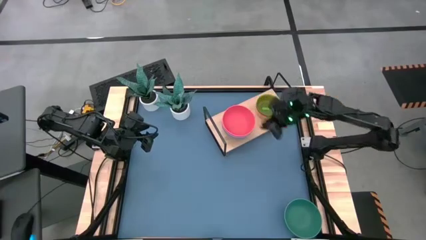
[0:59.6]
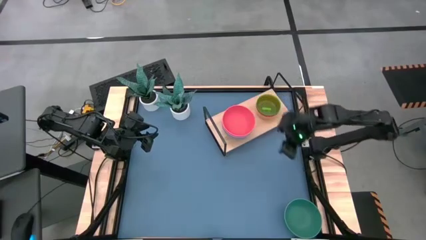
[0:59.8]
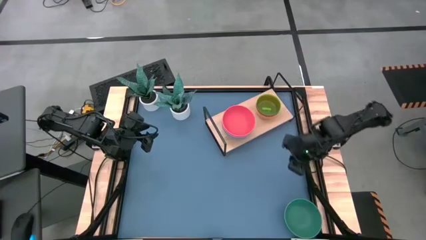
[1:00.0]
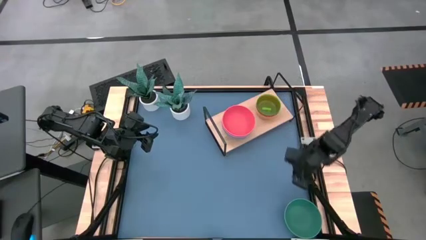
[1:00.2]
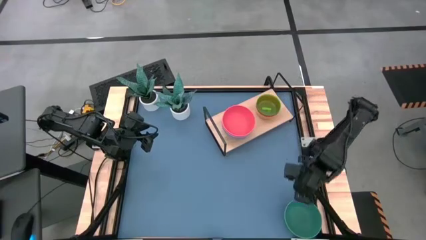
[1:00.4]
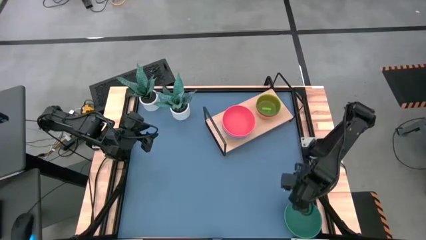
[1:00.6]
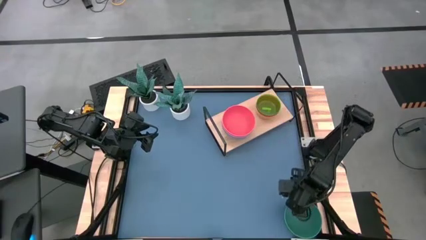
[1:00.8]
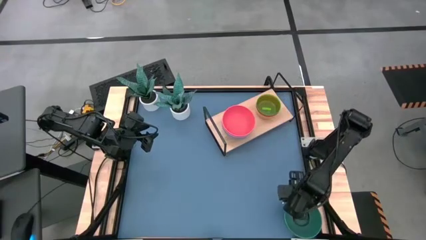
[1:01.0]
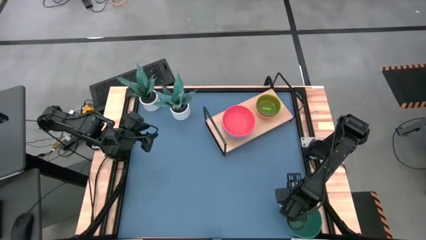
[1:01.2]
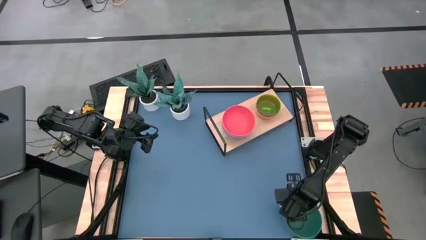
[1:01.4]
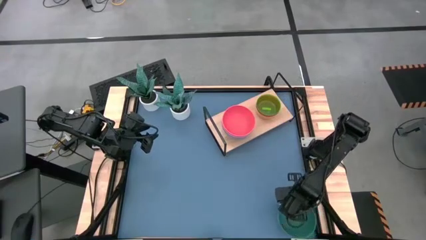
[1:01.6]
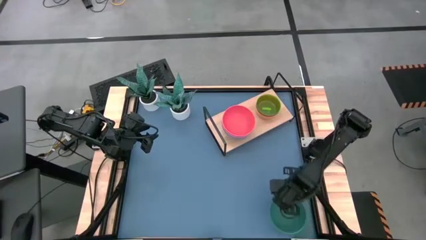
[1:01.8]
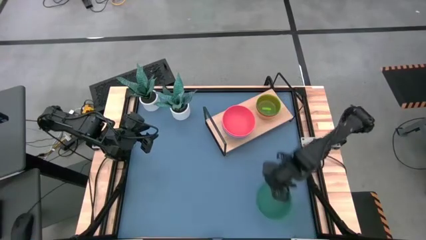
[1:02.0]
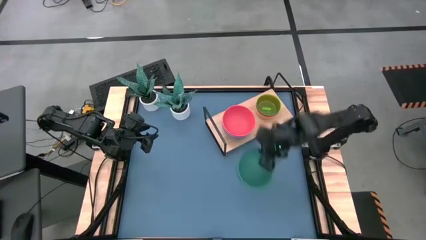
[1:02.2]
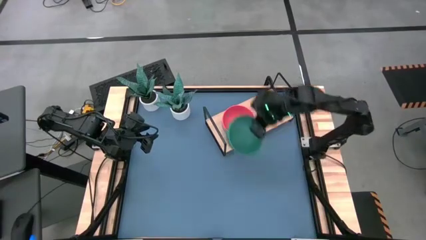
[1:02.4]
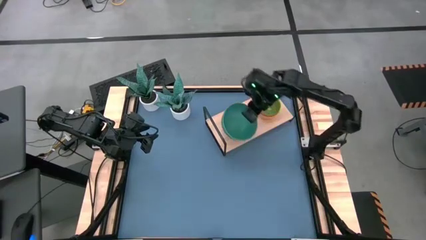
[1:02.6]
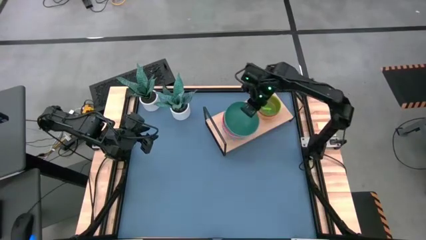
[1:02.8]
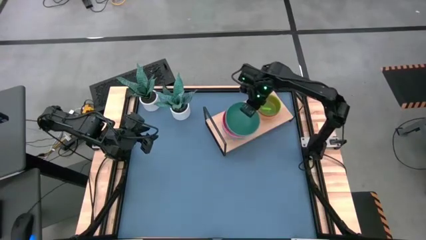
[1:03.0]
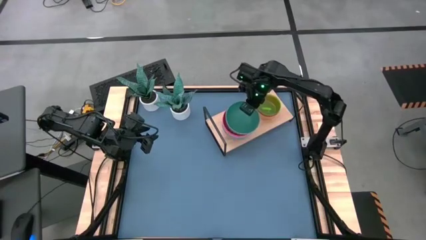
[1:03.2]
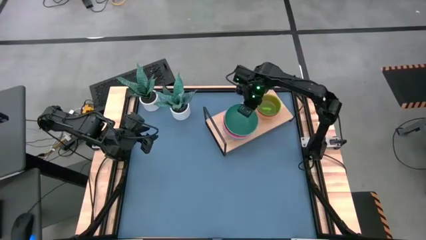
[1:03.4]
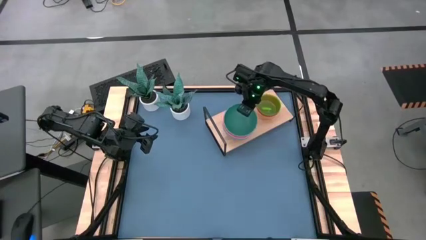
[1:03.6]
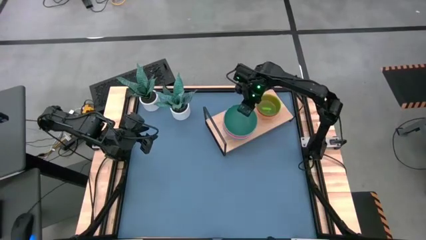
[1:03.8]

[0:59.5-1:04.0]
Task: Place and stack bowls onto a shelf
Stack the large green bowl on top of the large orange bowl on the shelf

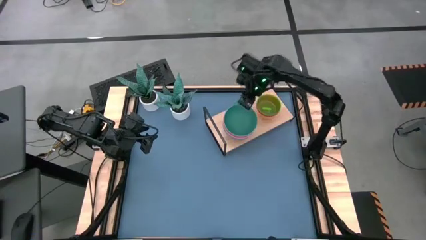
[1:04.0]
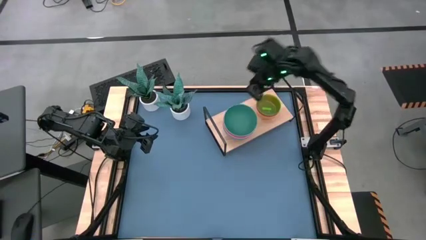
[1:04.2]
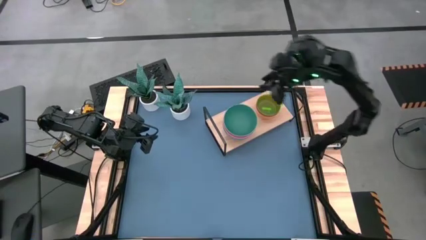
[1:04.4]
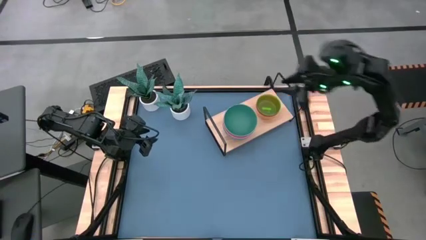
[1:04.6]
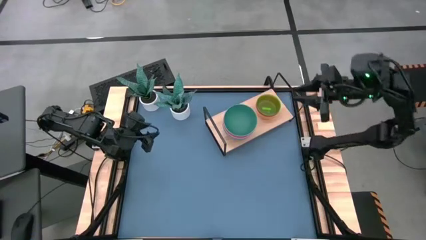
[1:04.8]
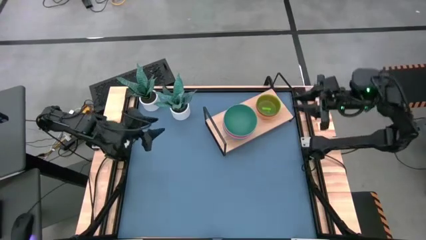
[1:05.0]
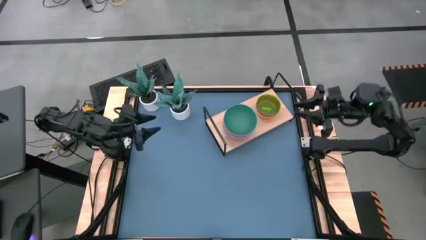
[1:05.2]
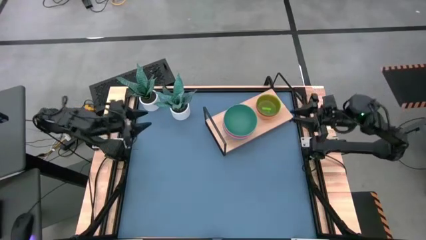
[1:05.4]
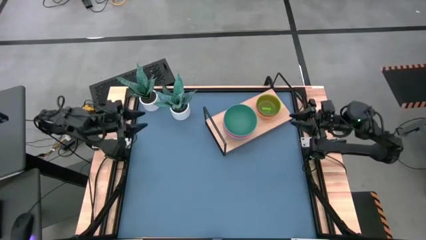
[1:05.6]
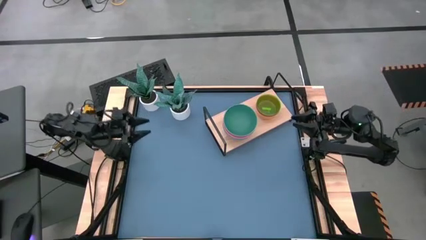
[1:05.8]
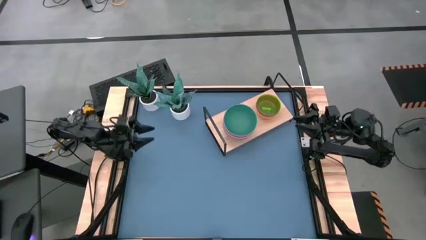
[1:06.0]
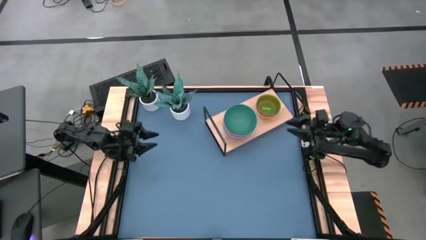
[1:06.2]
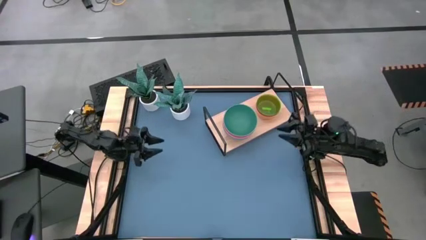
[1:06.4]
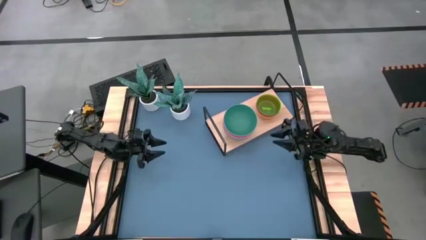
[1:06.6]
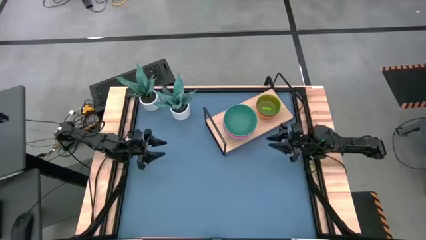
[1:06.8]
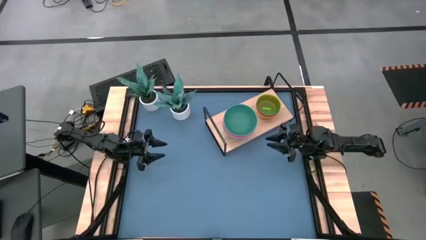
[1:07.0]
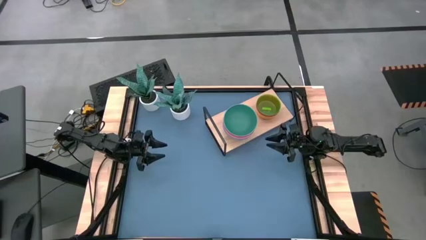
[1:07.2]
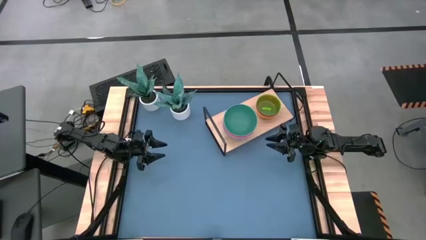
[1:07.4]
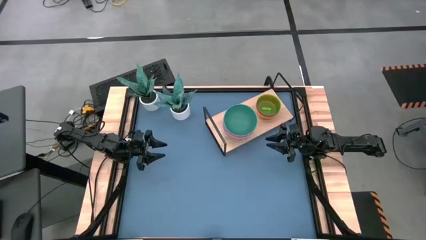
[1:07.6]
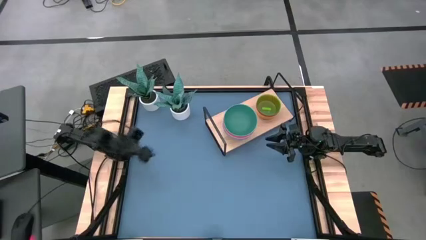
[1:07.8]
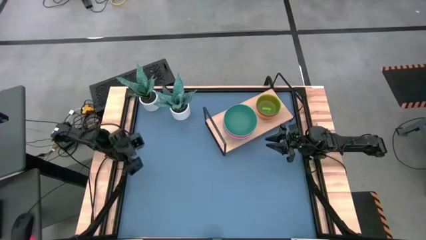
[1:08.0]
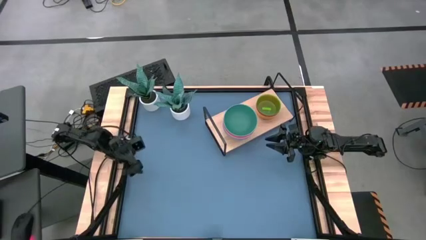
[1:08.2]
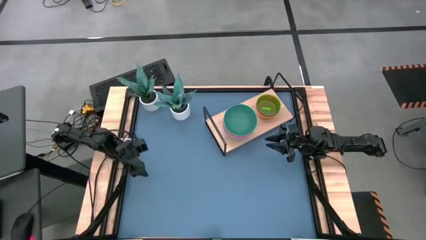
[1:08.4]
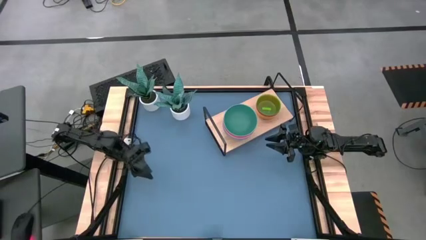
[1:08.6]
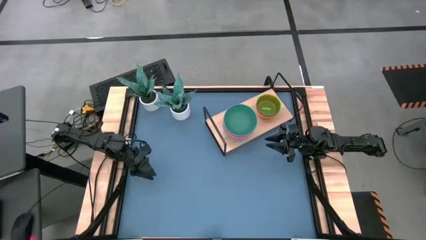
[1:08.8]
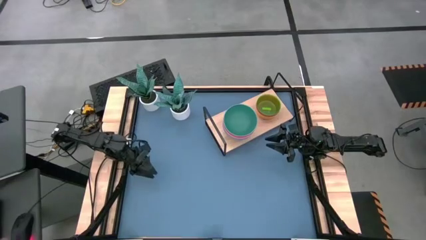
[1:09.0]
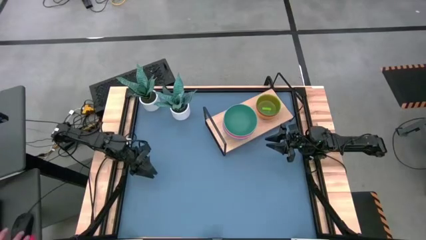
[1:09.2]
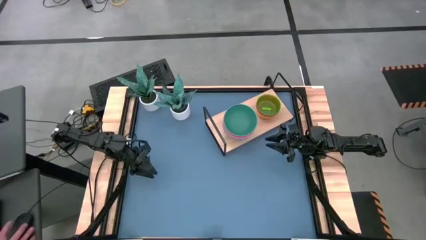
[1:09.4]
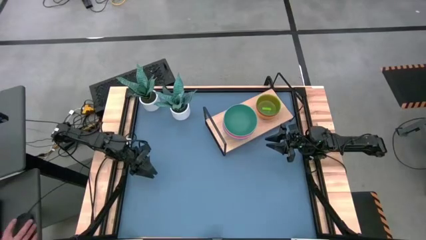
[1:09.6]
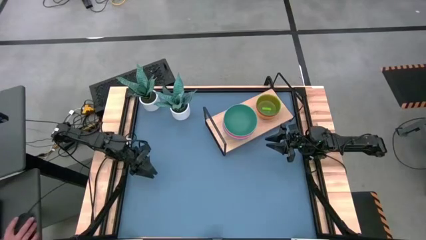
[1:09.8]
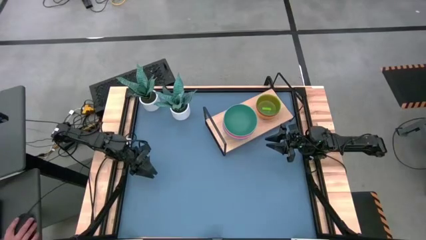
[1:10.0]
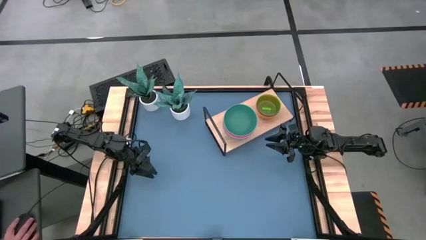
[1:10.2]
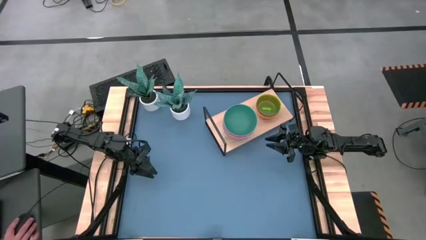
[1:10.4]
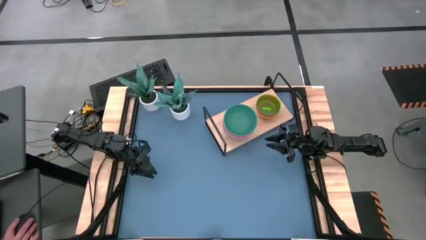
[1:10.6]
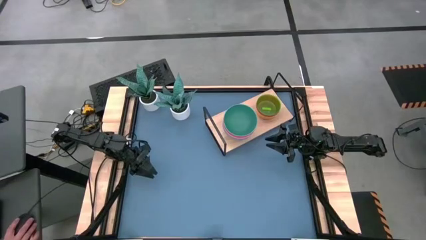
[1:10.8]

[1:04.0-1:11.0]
Return to Home Position

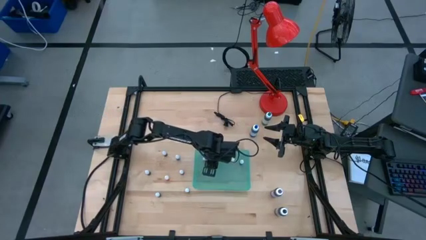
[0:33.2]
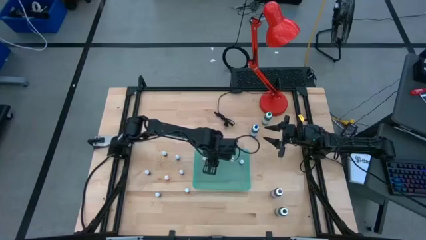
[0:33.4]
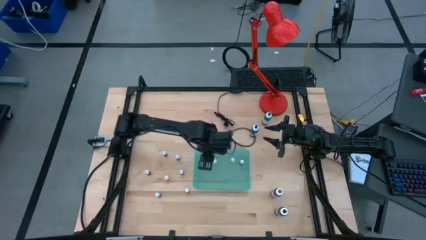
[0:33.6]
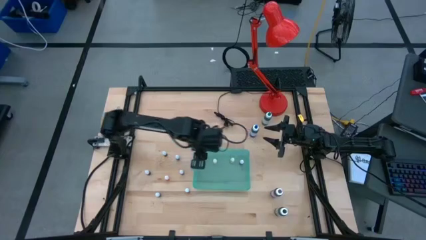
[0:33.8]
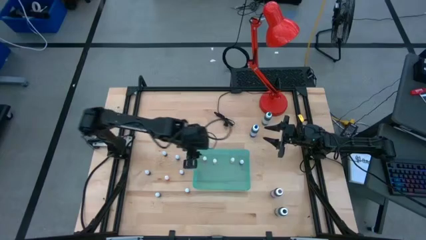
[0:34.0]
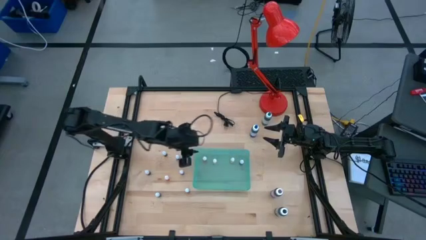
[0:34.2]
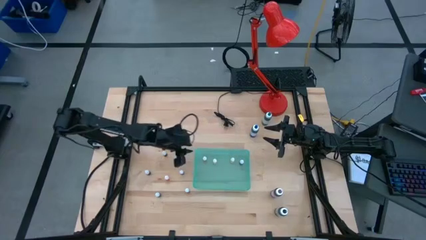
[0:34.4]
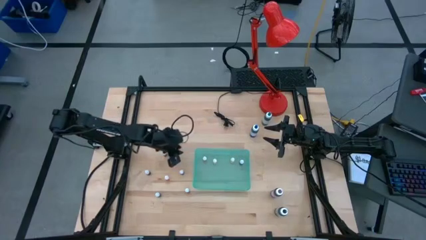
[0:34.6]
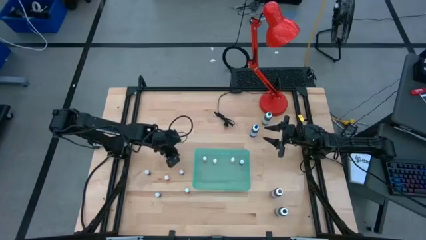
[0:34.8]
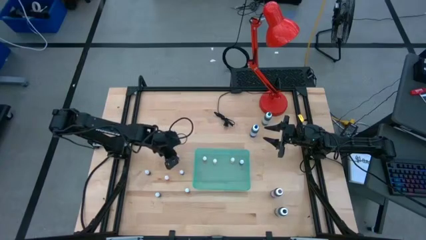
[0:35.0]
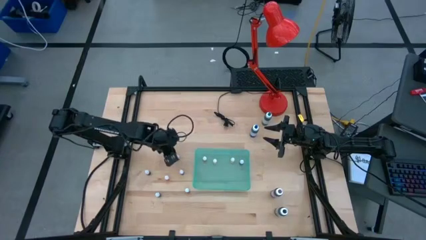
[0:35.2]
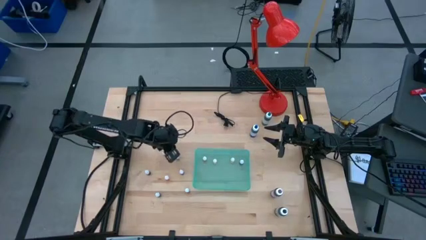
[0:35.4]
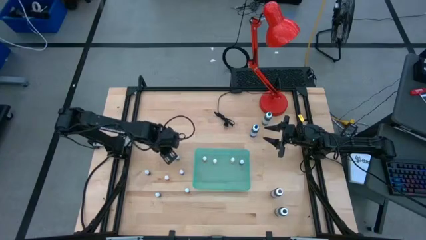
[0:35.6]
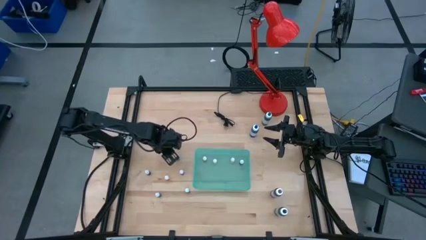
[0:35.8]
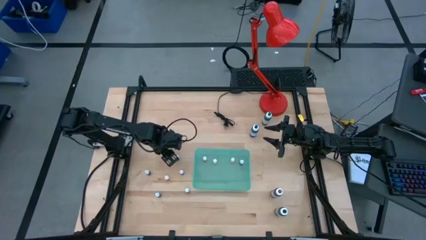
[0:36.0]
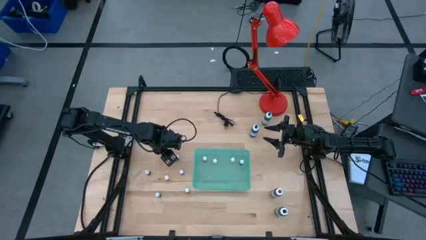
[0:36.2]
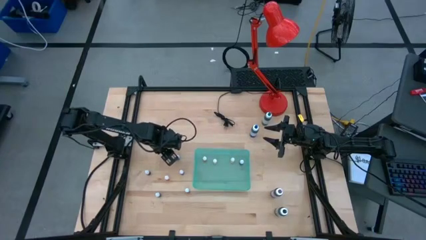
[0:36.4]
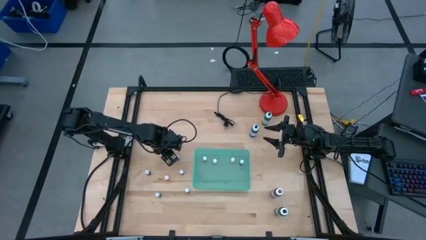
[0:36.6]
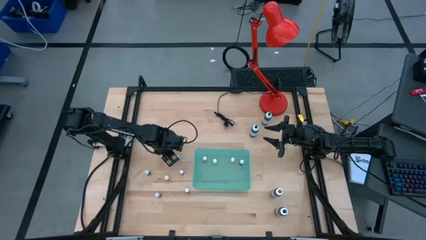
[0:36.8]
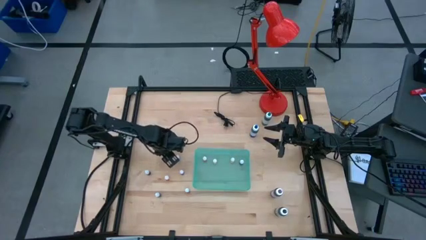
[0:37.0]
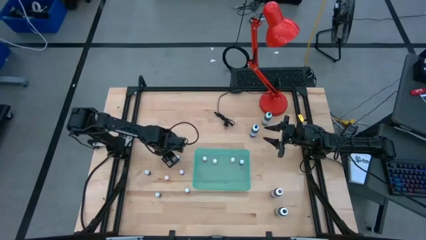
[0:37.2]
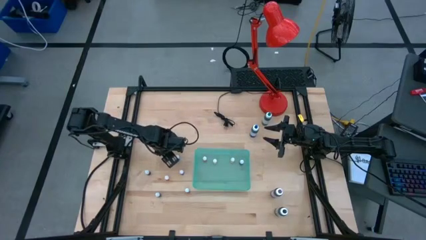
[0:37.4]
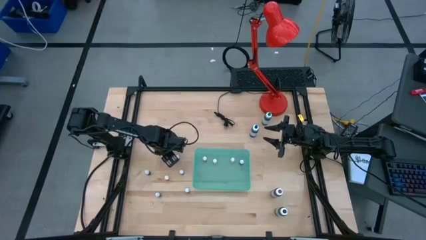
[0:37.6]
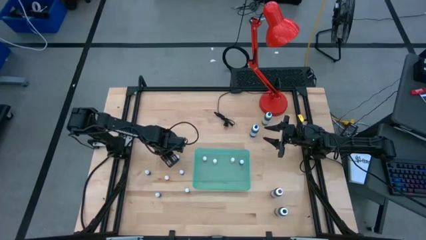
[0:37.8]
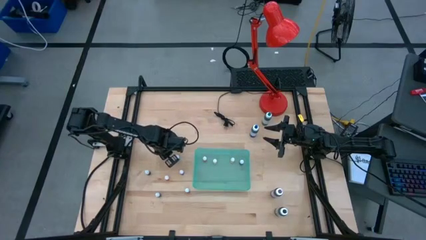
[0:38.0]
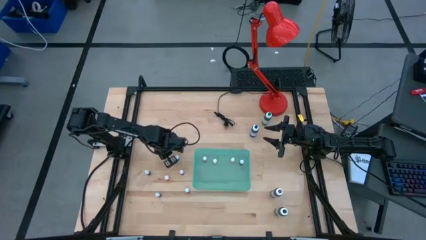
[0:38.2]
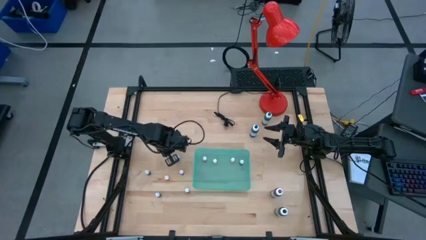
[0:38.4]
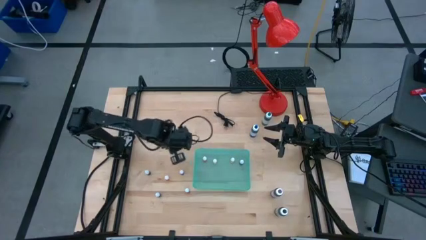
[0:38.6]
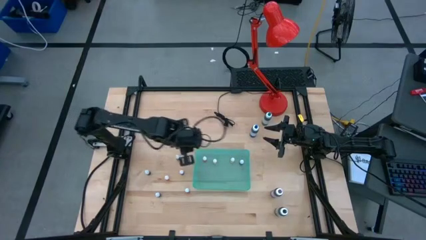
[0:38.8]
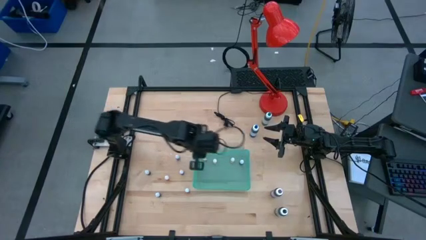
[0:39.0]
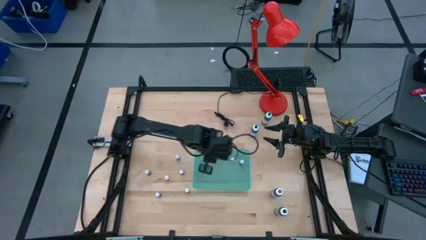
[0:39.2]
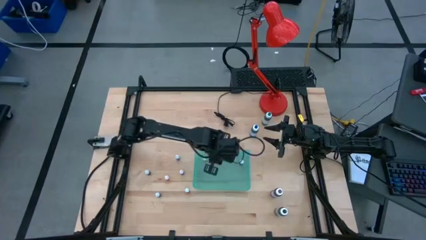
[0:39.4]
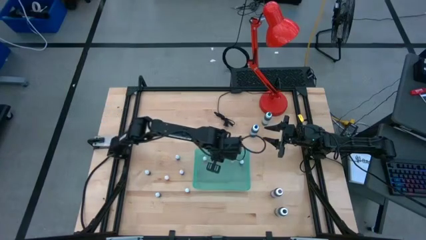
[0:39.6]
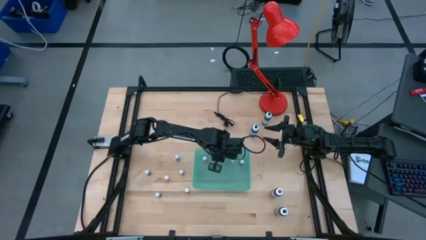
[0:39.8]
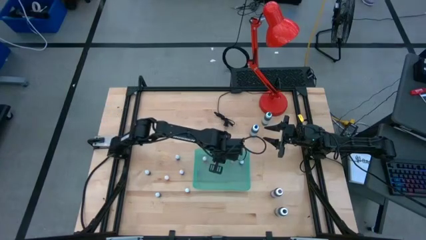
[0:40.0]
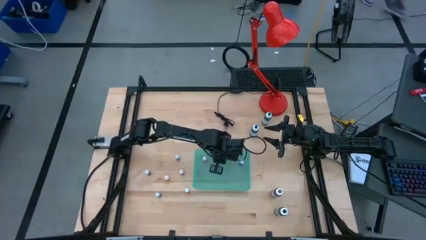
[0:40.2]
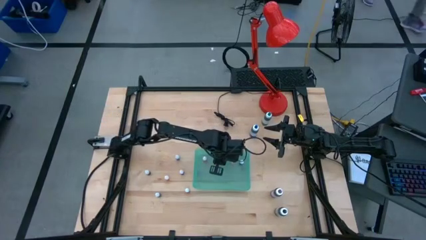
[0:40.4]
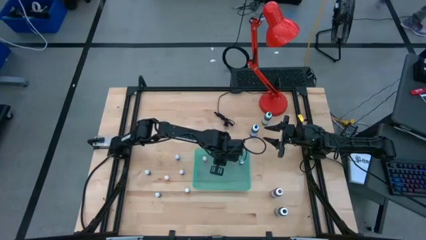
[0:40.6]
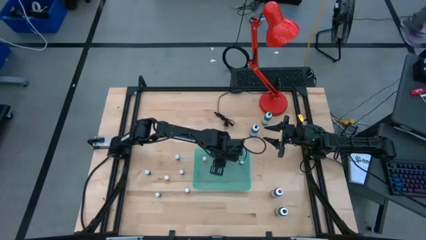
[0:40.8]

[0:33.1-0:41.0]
Task: Pick & Place food coloring
Put the small green food coloring bottle into the light blue bin
